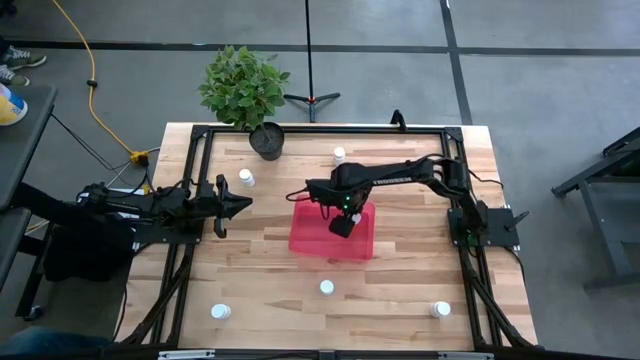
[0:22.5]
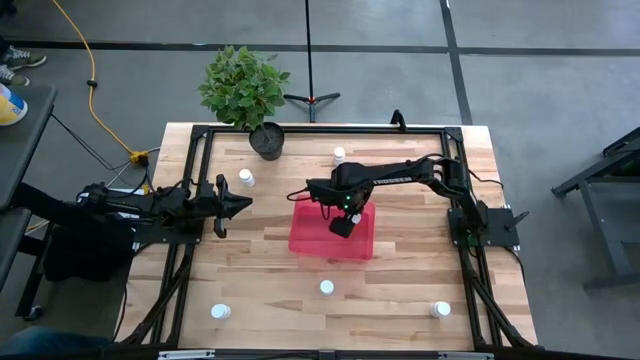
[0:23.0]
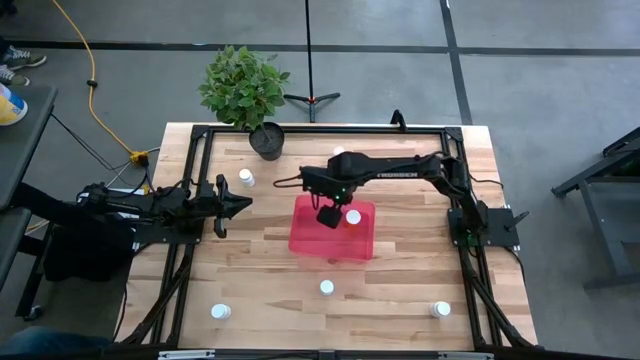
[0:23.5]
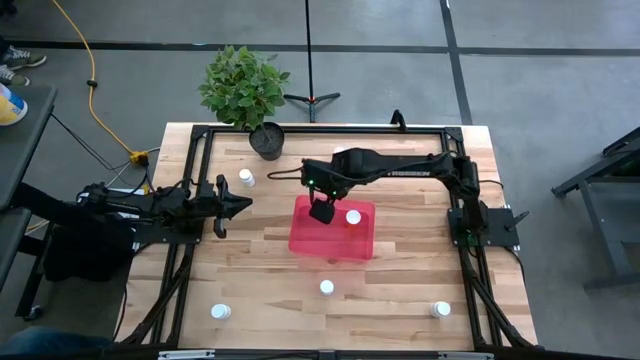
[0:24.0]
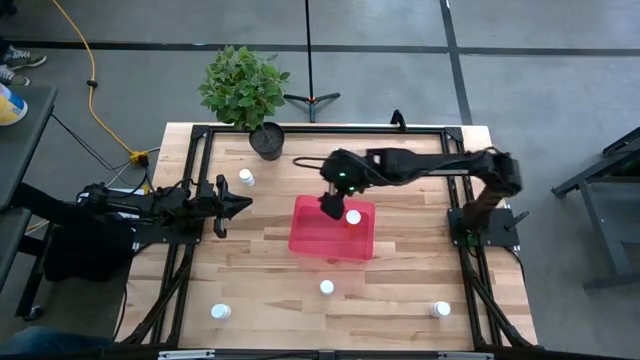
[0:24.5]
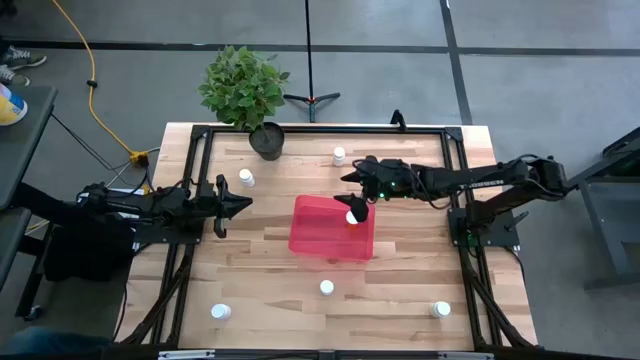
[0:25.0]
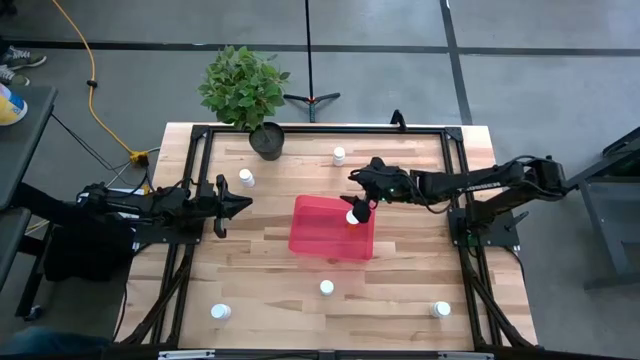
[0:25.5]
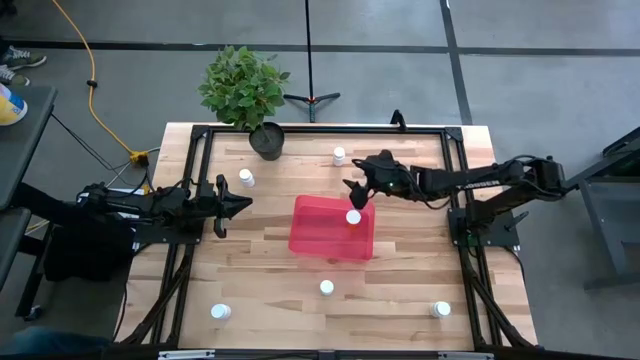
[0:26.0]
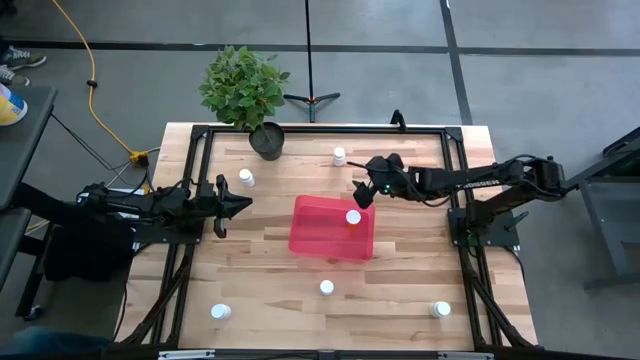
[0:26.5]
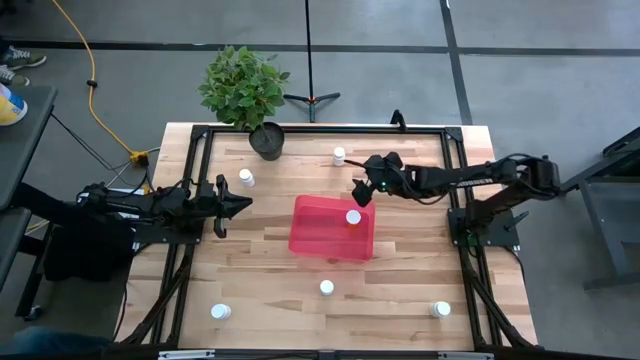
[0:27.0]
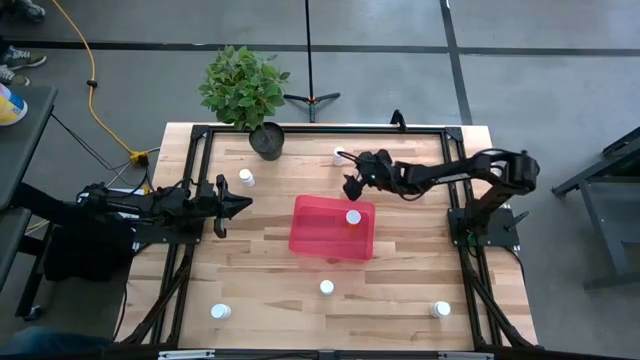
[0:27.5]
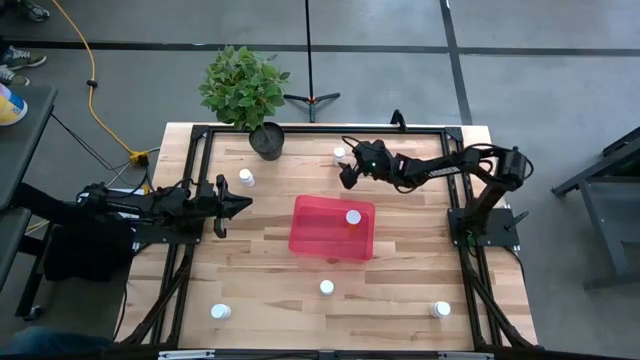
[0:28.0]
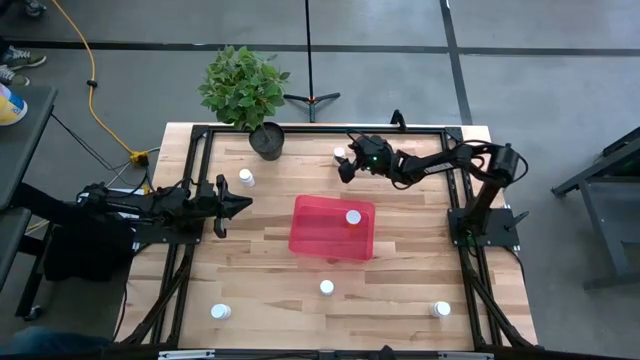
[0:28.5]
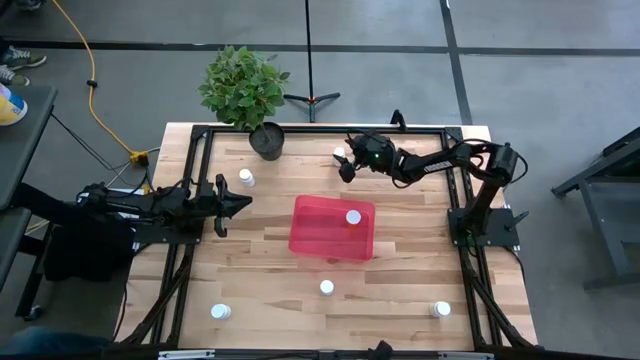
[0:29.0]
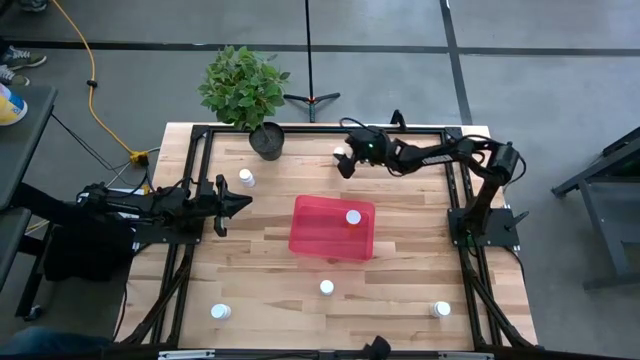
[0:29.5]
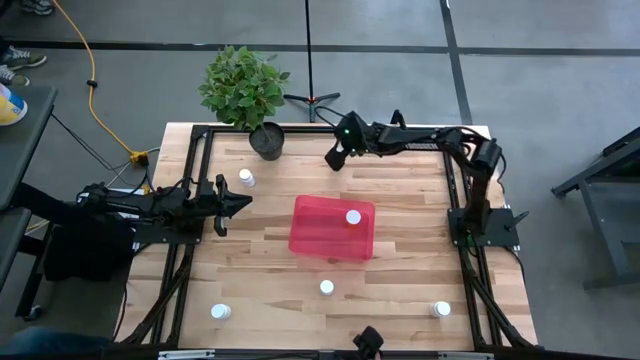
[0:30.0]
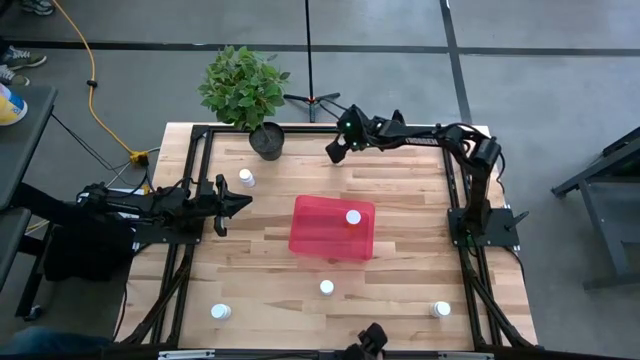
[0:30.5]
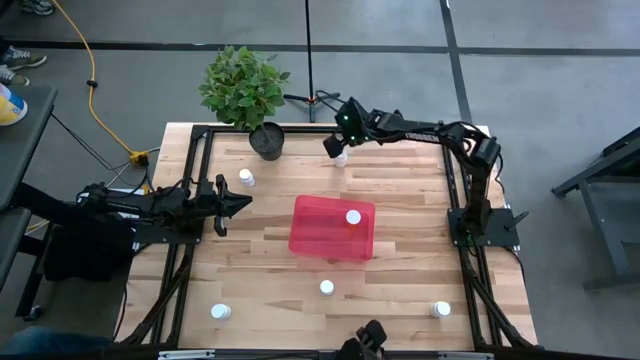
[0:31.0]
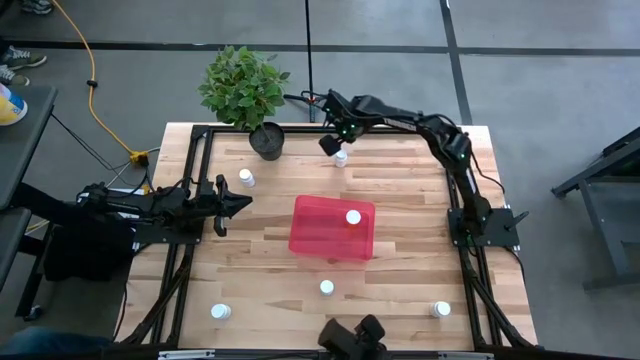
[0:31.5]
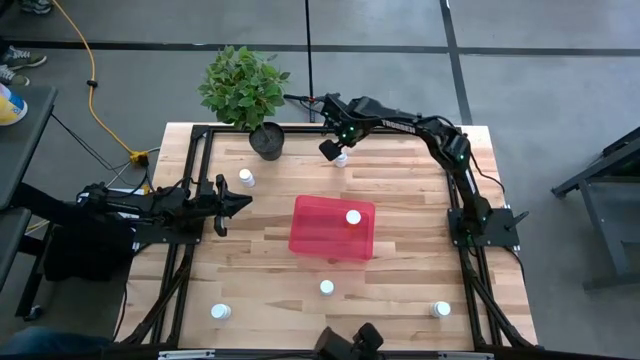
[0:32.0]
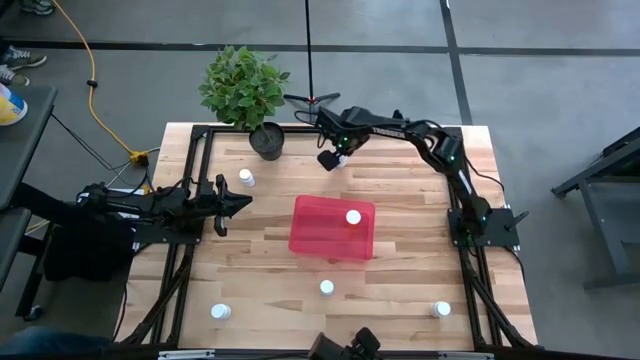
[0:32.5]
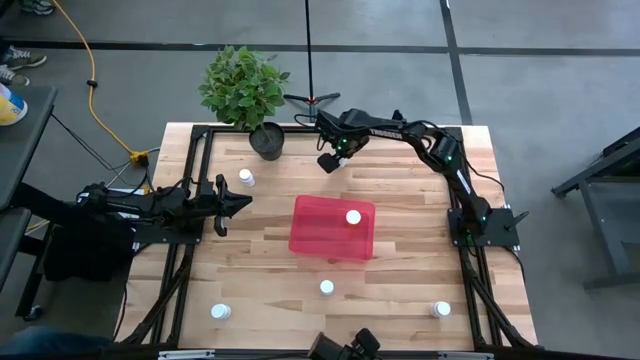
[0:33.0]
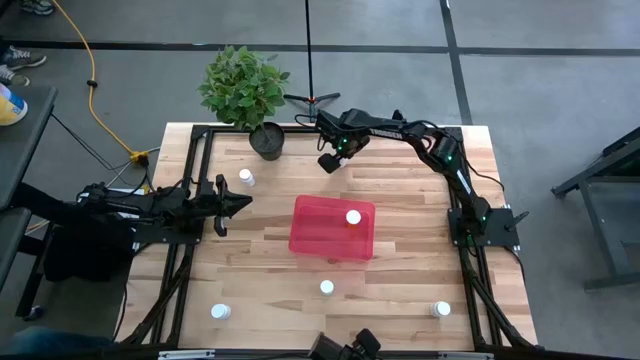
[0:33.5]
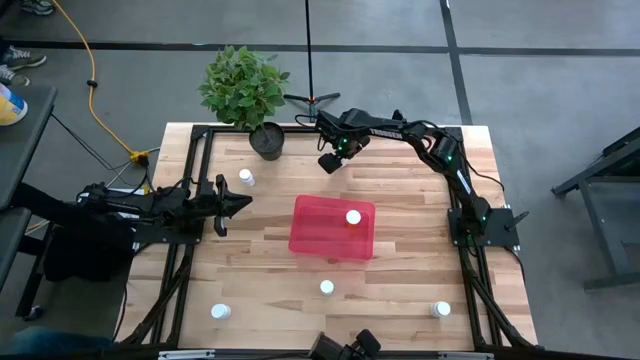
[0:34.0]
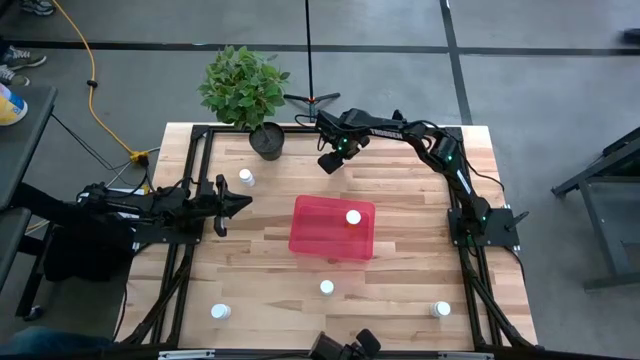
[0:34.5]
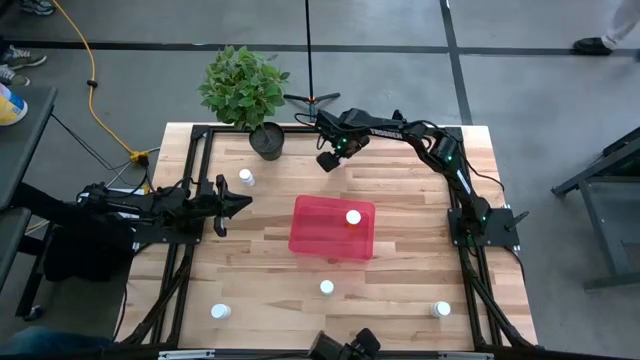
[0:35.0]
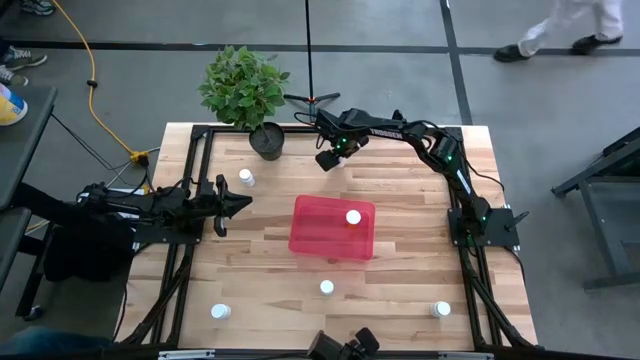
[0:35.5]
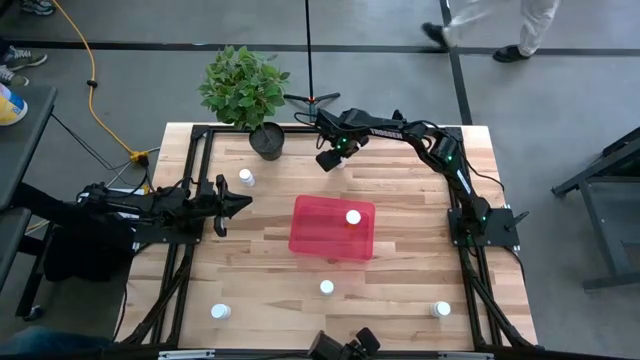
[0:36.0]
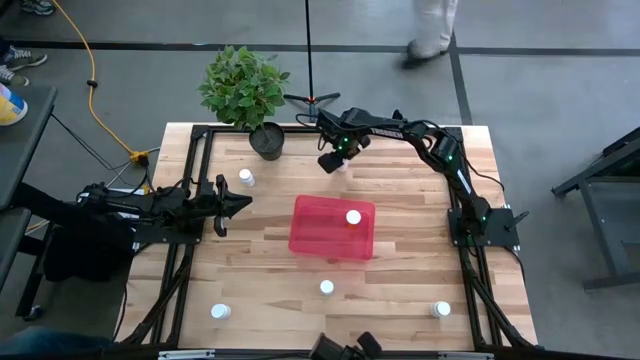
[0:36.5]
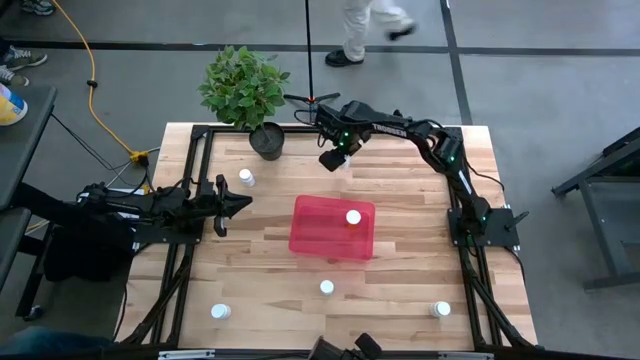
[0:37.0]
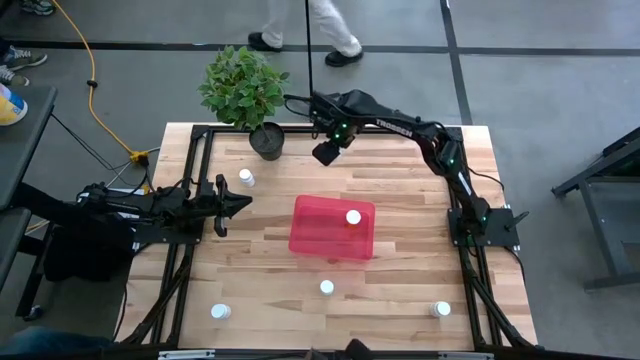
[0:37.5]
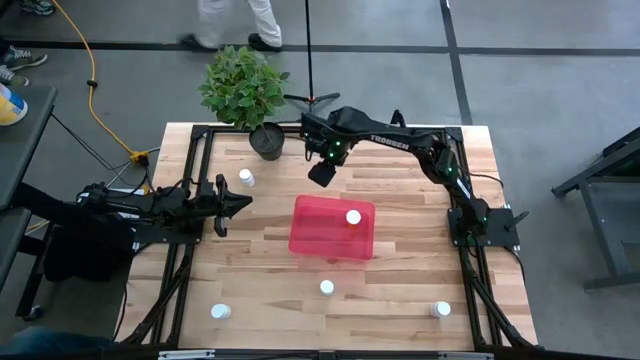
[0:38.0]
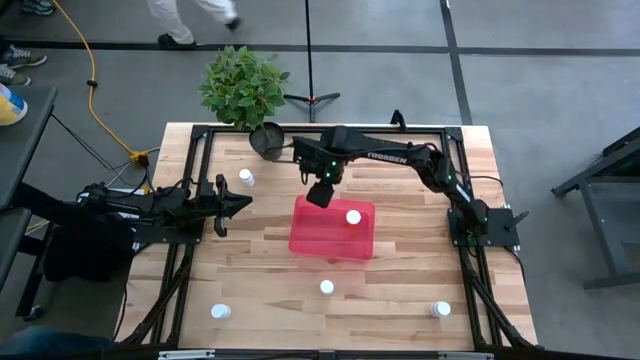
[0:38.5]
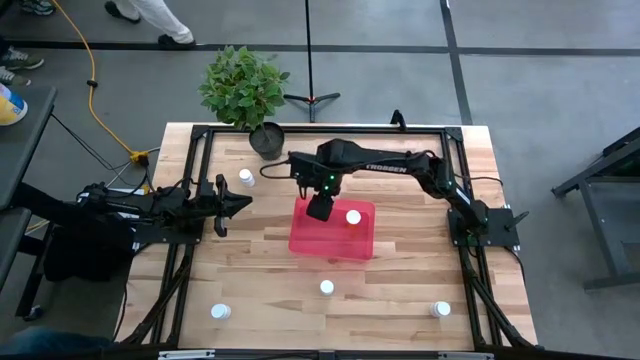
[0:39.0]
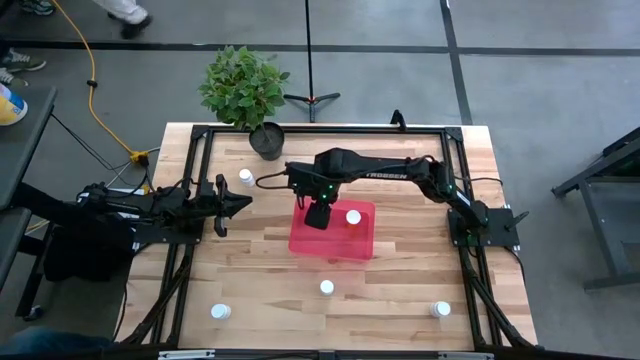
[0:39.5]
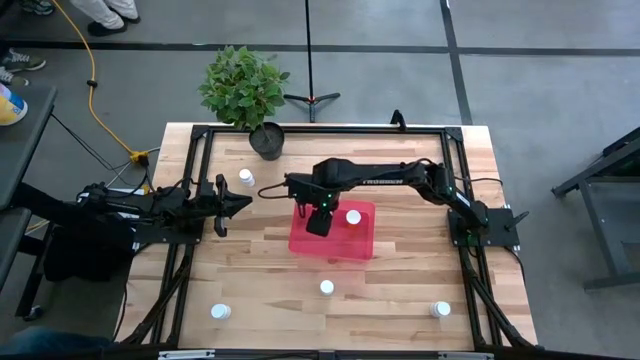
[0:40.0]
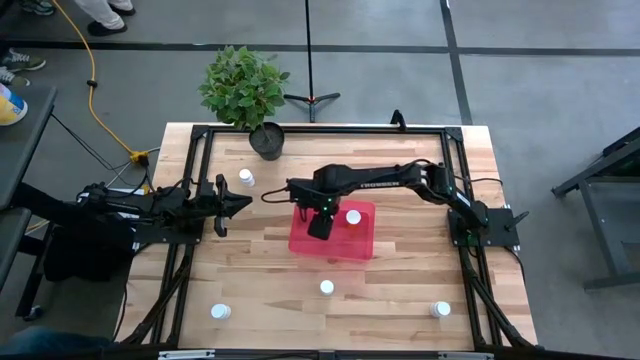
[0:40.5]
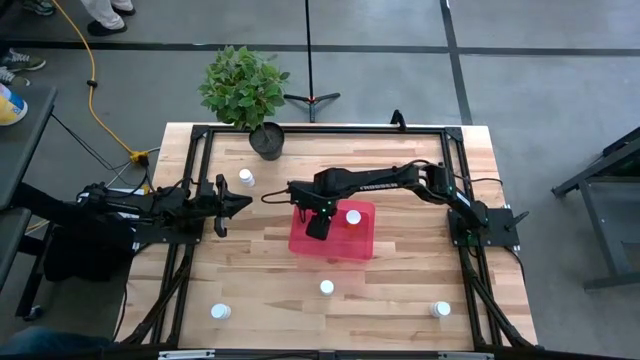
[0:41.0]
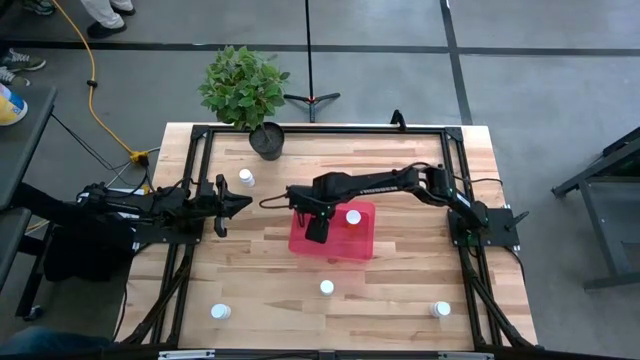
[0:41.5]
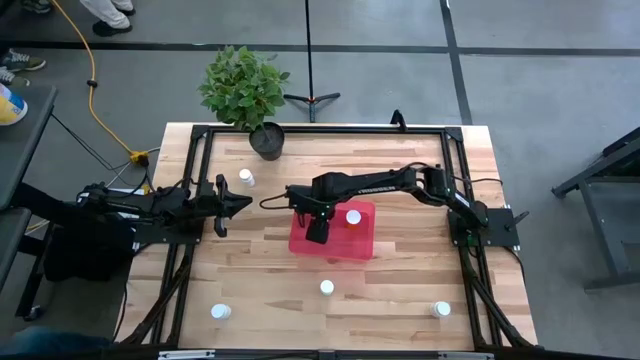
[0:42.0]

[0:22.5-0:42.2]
Task: Pick and place pill bottles into a basket
Put the white medicine bottle into the bin
